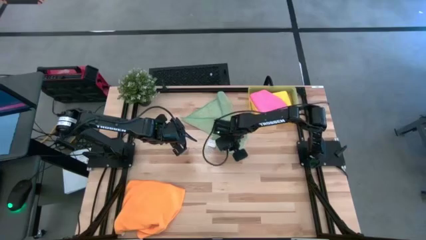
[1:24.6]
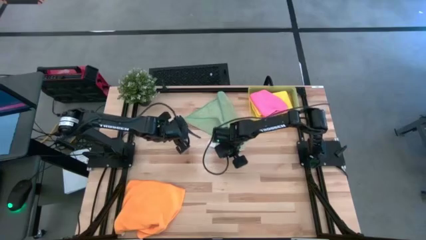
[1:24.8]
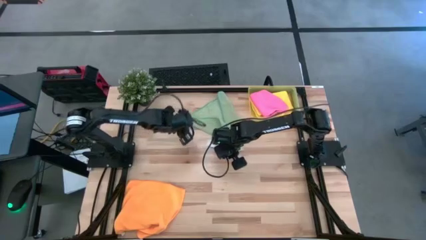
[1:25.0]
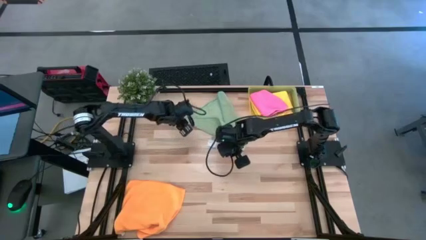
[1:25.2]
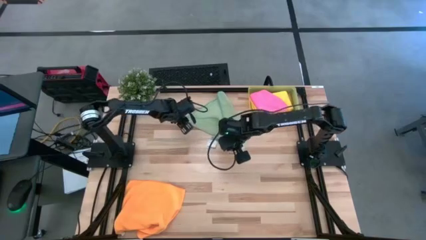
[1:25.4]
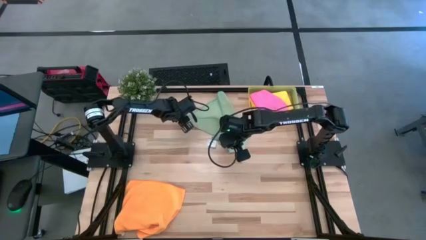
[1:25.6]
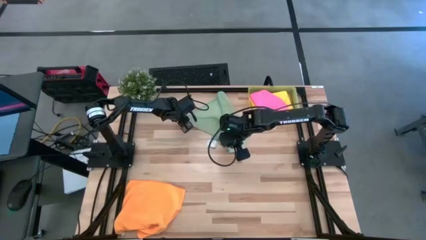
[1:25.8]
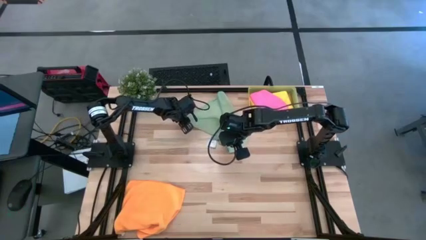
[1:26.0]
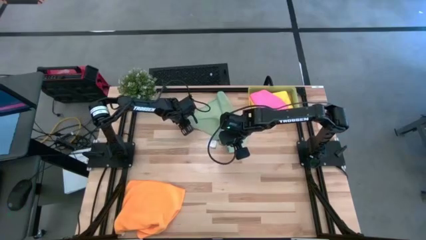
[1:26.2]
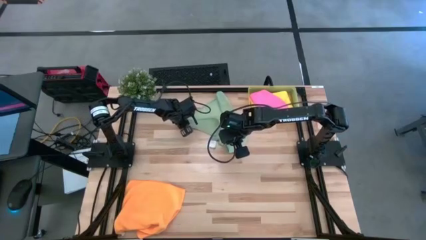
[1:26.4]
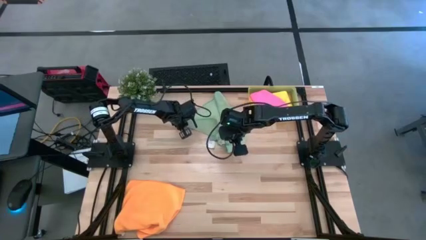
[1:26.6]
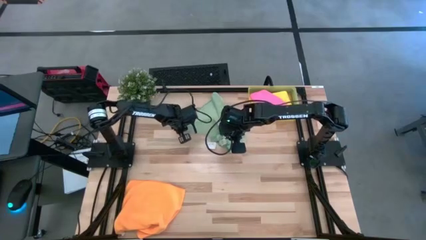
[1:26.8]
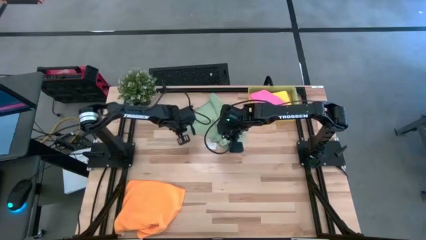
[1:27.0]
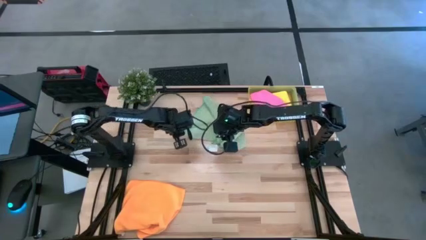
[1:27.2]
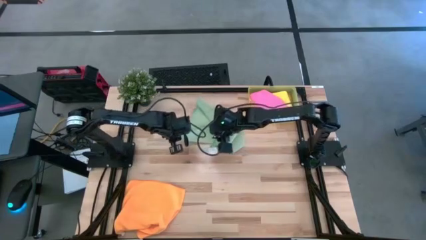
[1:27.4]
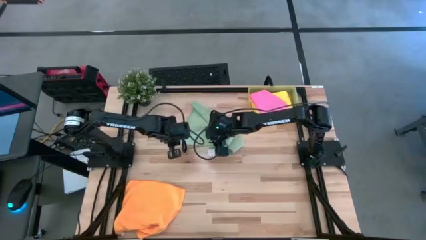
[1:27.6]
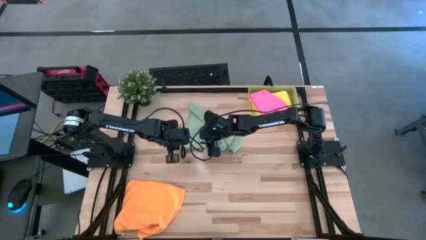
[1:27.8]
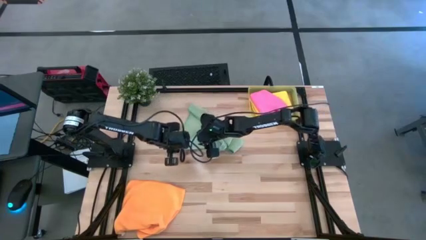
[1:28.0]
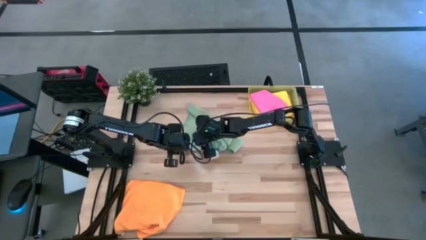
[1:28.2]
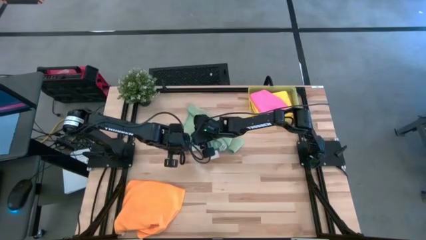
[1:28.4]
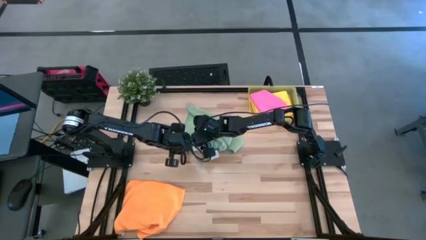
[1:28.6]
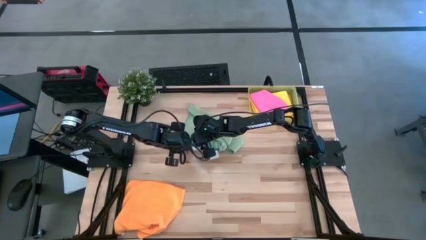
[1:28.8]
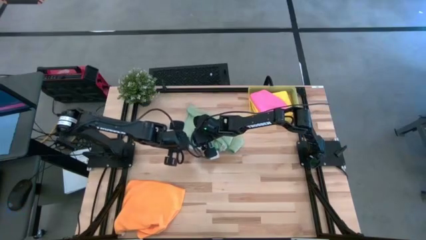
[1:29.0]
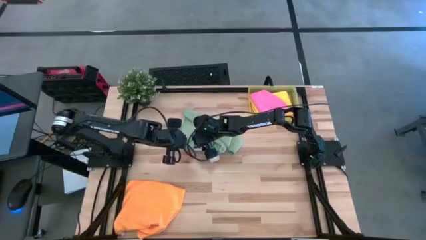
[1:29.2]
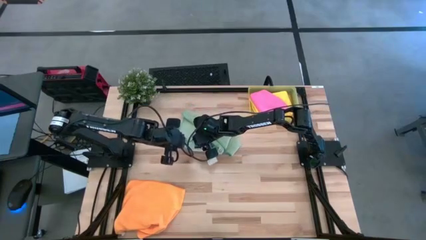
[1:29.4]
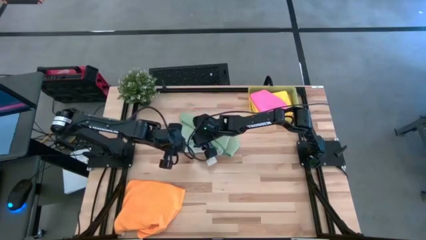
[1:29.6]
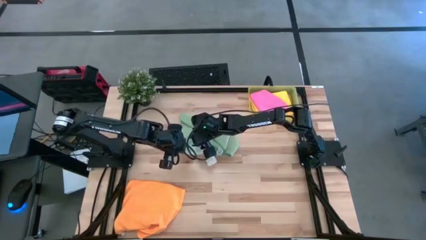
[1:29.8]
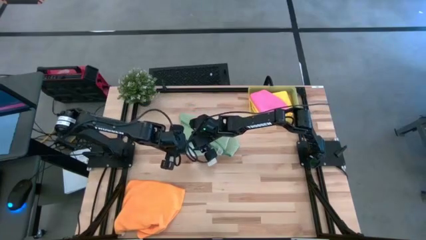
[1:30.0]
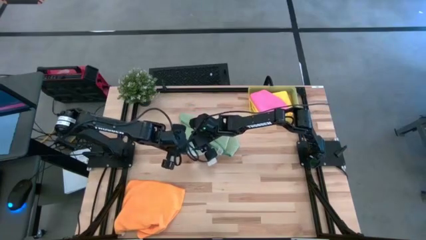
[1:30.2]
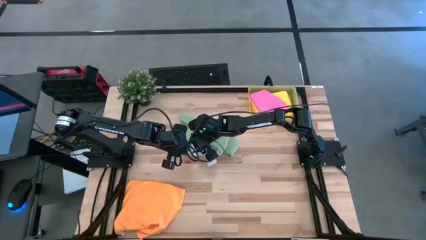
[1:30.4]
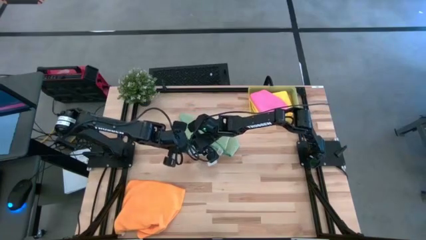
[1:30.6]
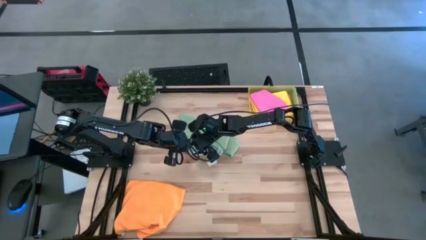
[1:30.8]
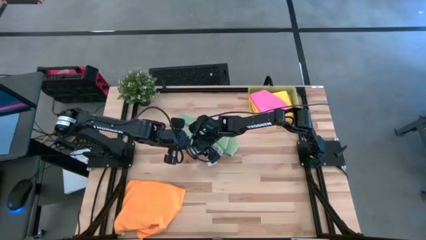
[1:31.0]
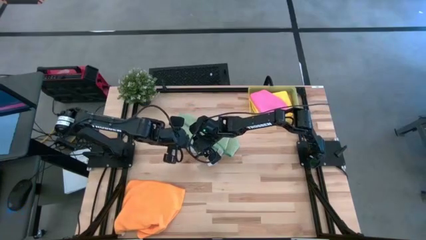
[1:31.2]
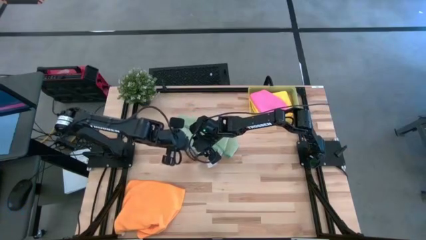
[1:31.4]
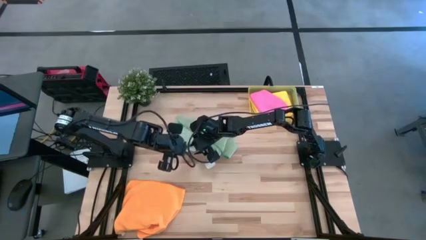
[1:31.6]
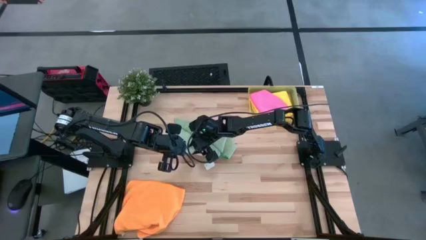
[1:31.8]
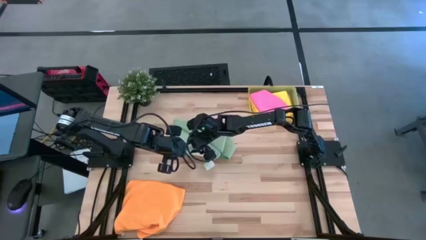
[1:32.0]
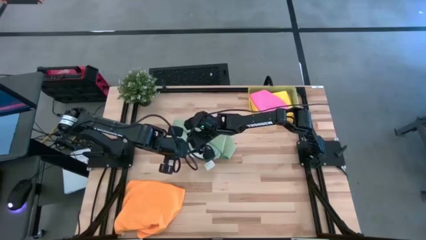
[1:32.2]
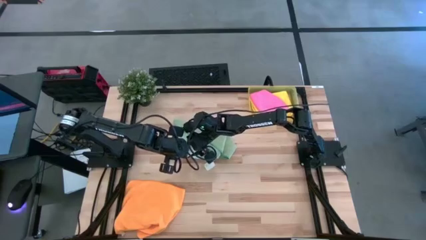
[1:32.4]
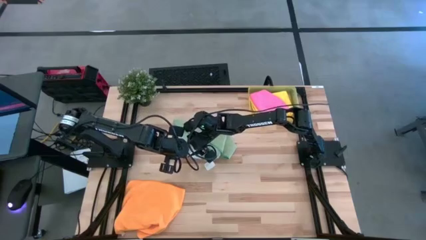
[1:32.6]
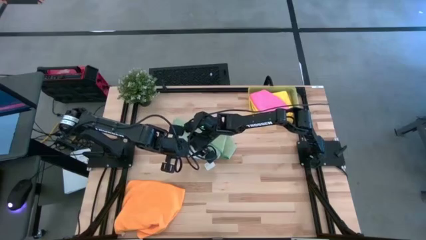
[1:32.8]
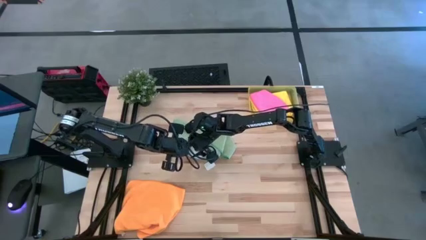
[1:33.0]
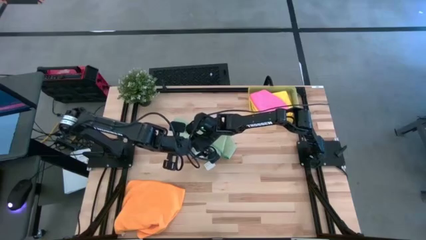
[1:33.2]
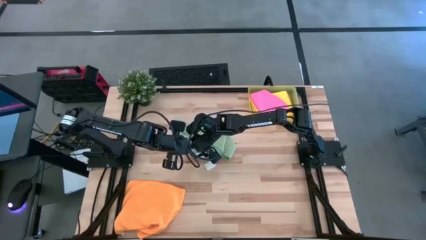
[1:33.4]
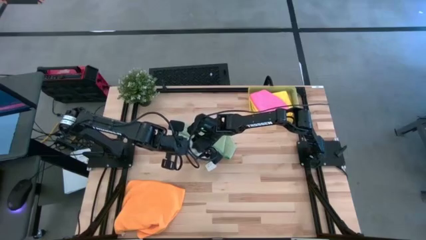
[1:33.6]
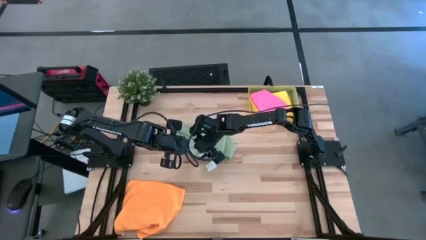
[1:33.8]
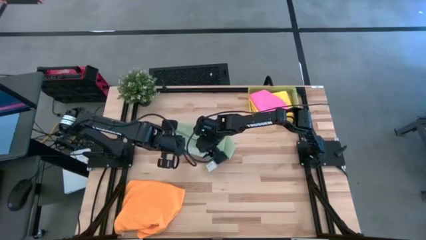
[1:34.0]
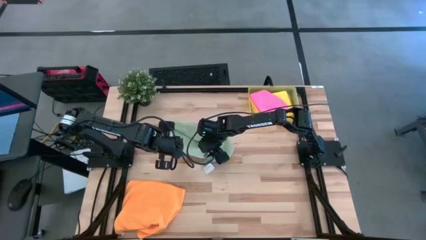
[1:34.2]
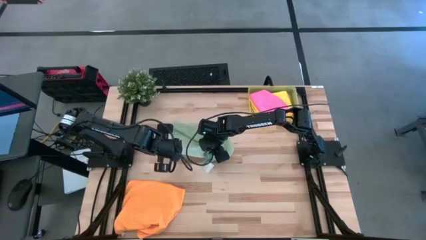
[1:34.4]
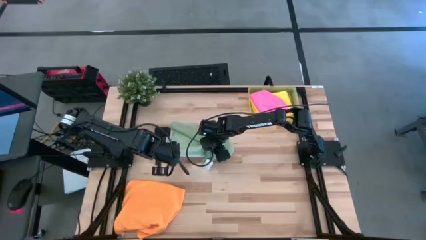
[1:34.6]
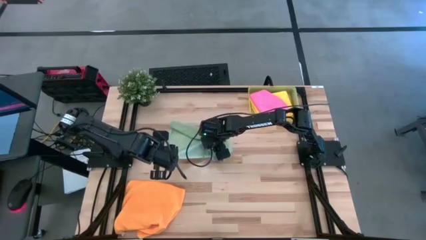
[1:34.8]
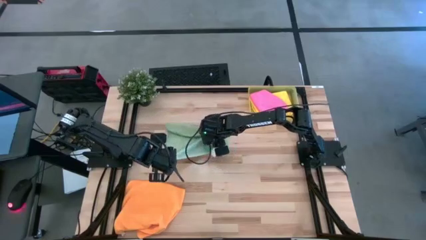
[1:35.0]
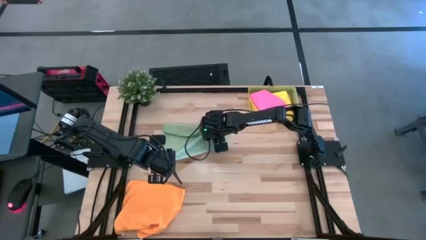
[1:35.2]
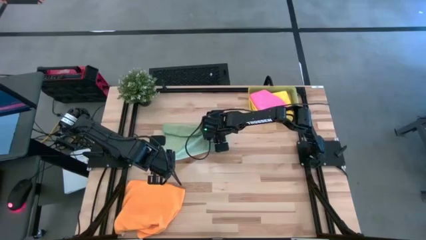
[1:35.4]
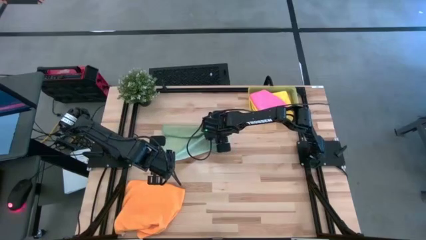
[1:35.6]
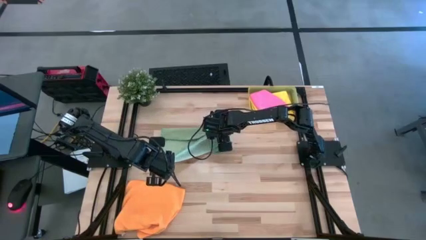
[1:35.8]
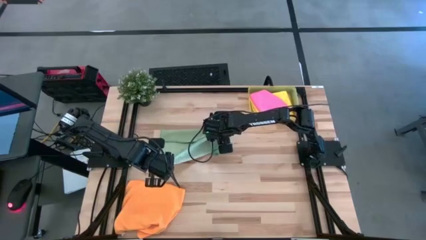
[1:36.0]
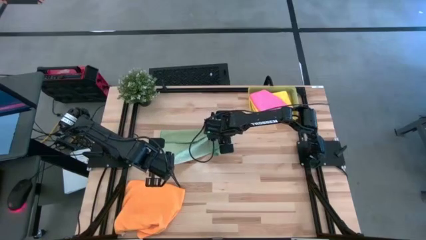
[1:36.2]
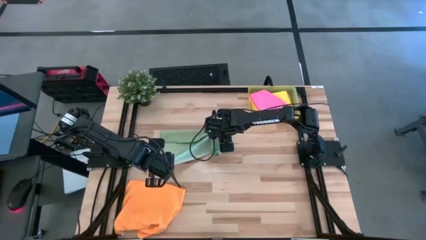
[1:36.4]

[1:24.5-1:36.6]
Task: Fold microfiber towels
Fold the light green towel

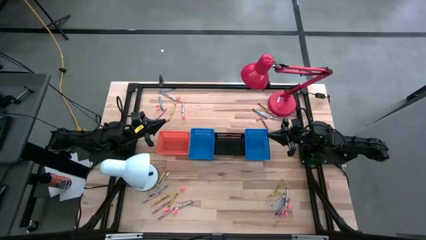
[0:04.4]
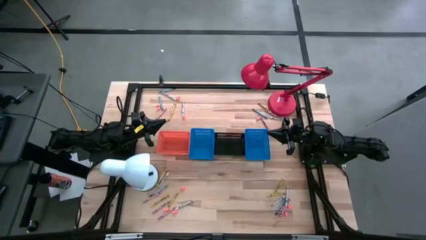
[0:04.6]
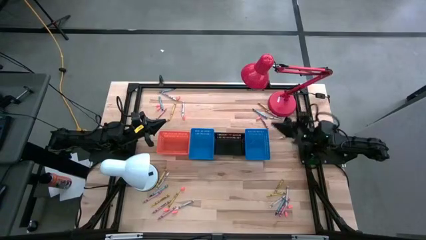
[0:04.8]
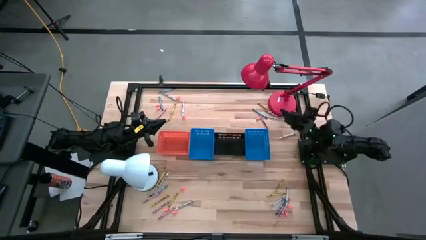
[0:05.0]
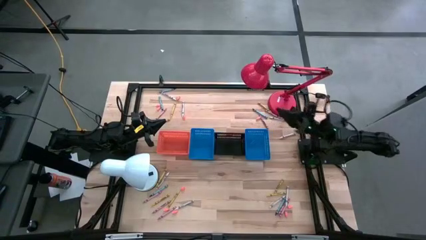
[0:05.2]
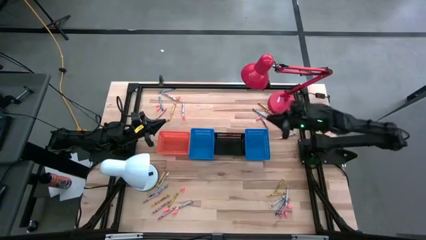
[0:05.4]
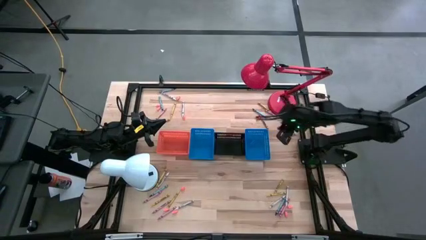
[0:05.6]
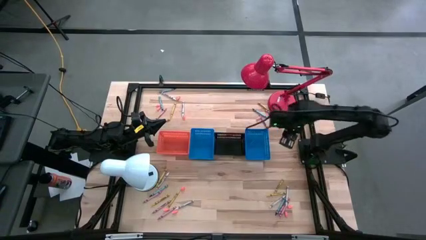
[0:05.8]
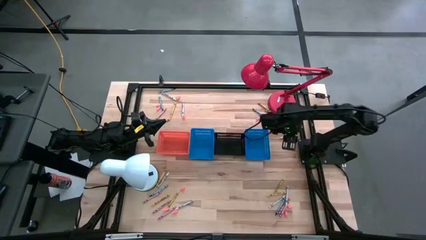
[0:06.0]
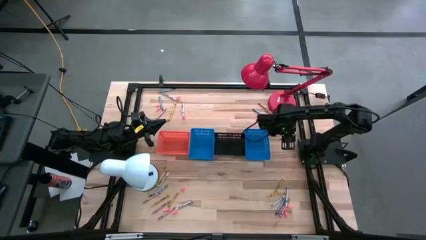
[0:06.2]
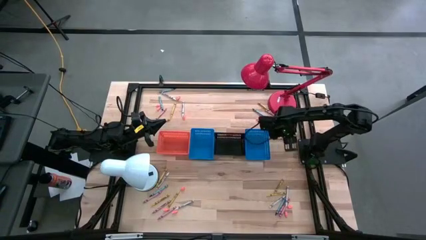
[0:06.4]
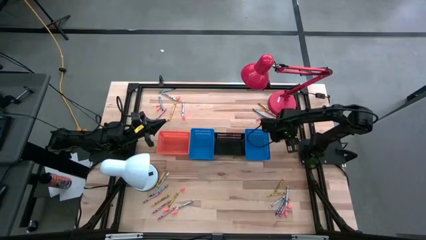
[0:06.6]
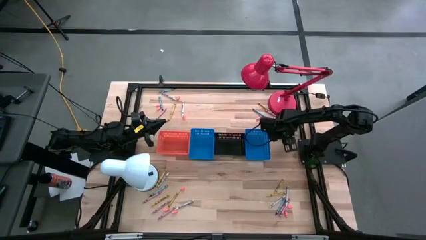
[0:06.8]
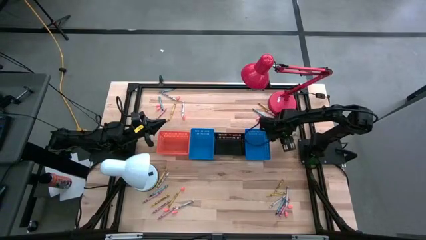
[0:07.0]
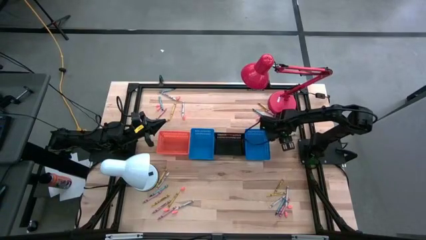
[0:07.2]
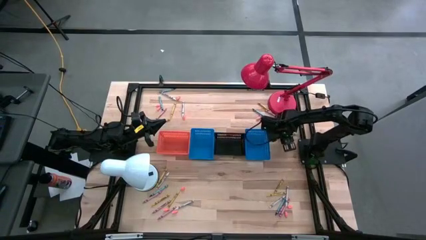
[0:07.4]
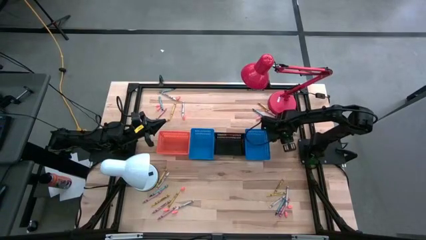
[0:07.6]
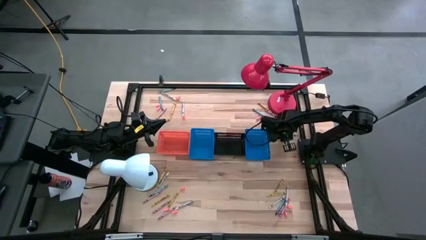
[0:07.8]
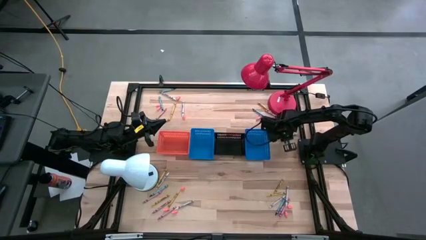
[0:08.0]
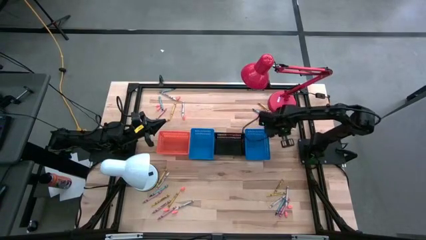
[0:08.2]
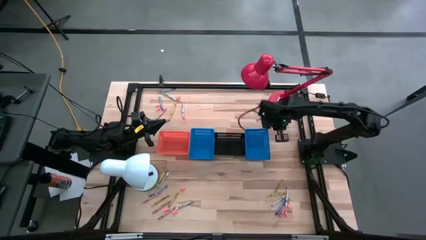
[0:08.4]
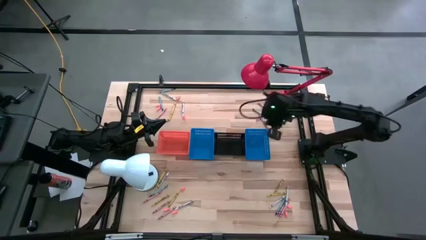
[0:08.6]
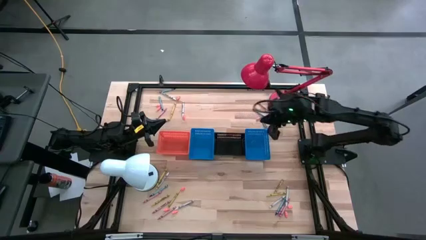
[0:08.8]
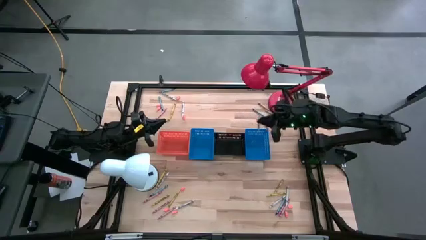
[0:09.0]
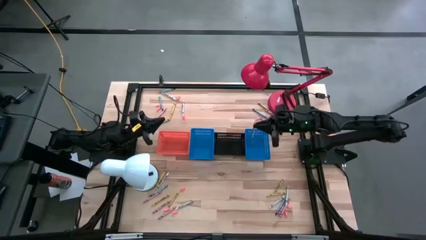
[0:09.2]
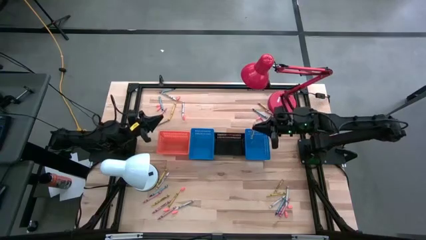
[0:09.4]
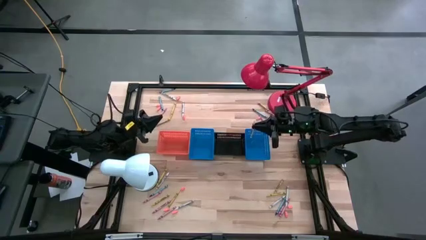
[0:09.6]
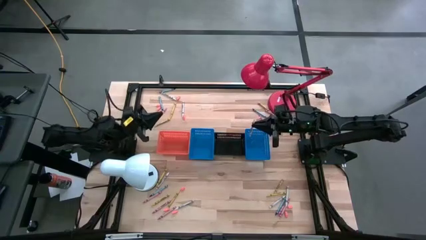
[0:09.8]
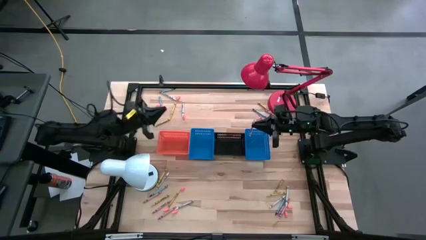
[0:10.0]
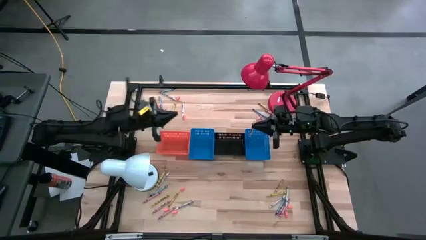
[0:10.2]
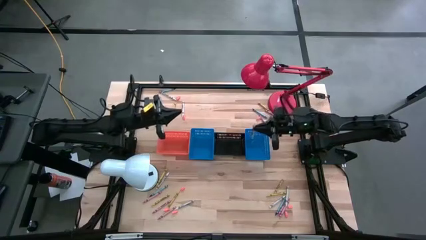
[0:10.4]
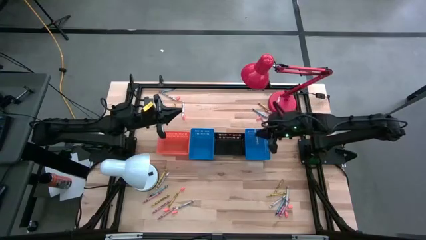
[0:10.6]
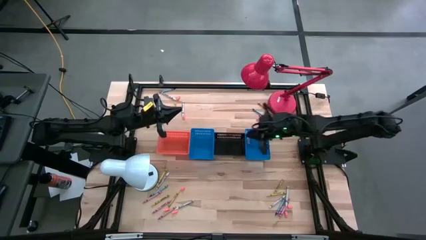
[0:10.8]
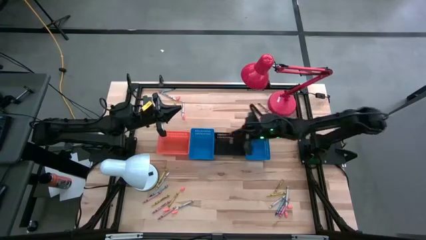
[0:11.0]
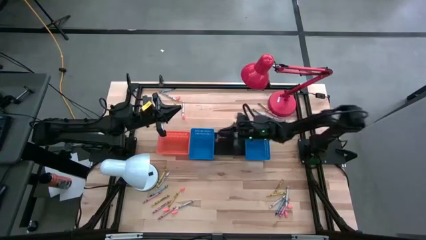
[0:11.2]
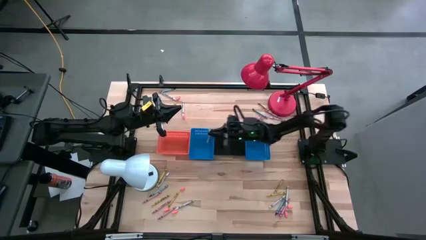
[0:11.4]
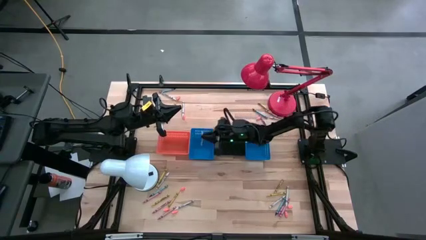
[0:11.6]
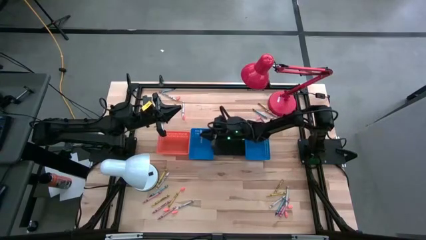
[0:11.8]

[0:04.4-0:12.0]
Task: Sort crayons
Put the white crayon into the left blue bin
